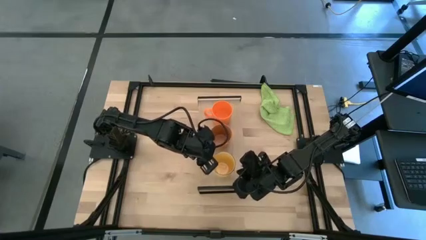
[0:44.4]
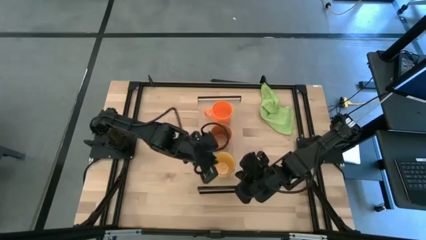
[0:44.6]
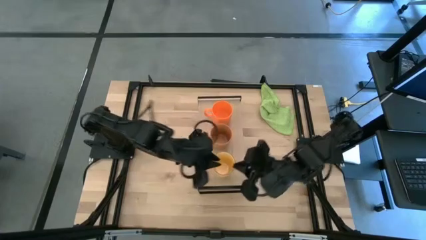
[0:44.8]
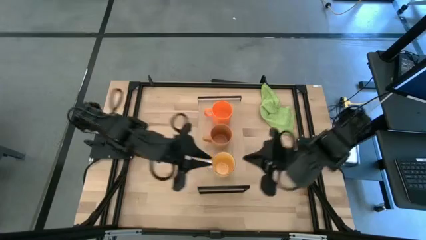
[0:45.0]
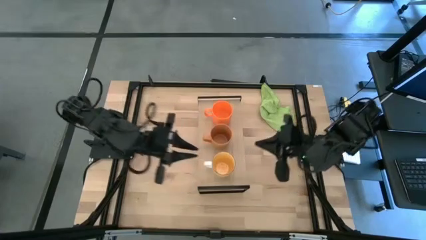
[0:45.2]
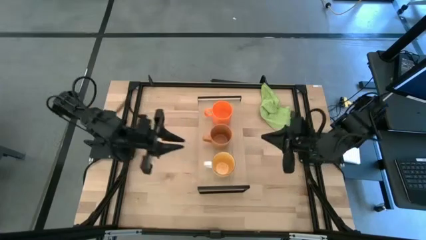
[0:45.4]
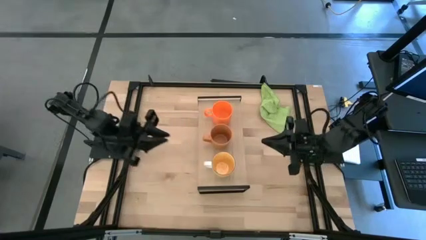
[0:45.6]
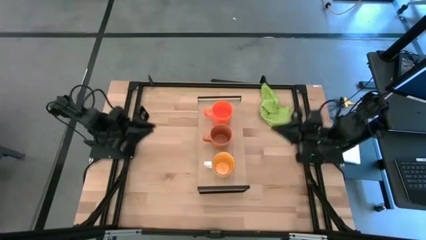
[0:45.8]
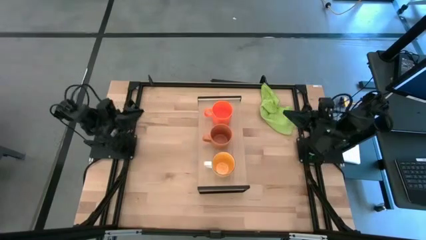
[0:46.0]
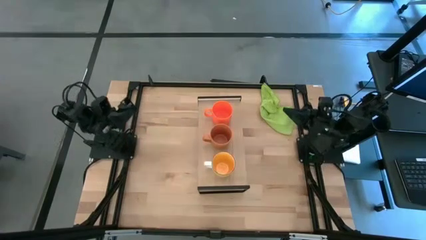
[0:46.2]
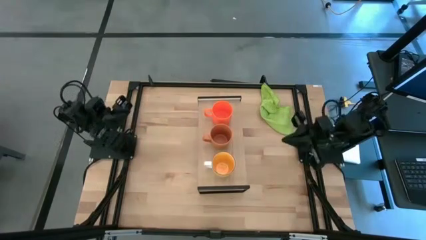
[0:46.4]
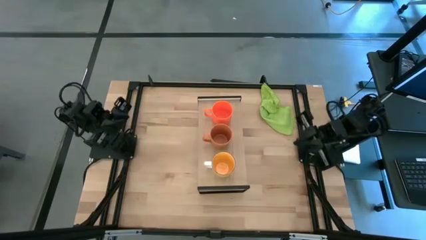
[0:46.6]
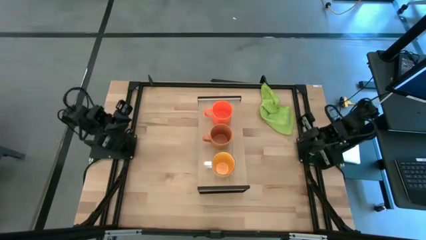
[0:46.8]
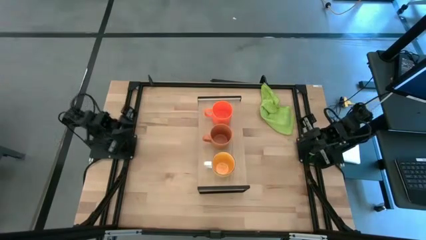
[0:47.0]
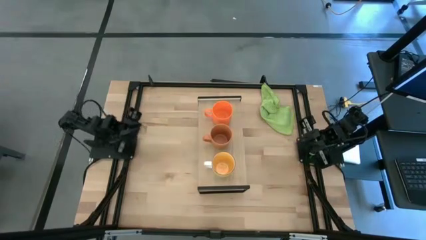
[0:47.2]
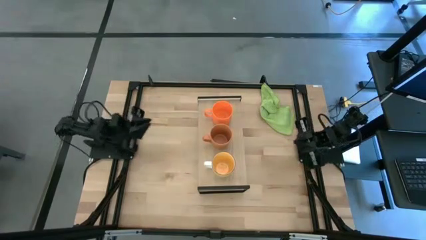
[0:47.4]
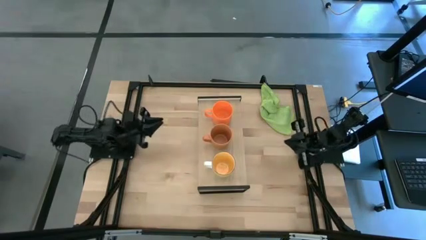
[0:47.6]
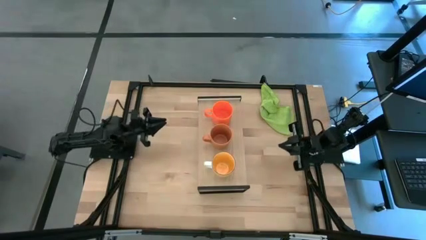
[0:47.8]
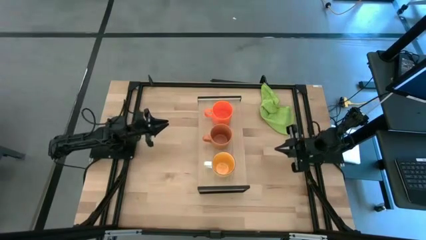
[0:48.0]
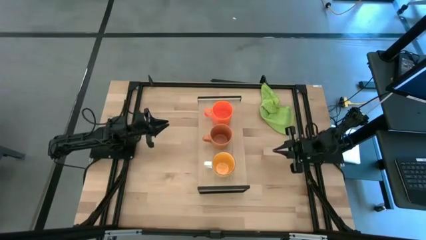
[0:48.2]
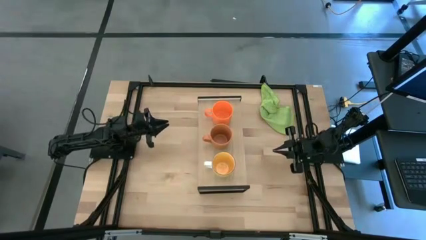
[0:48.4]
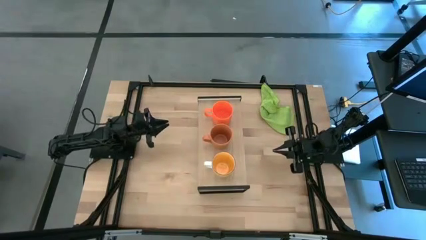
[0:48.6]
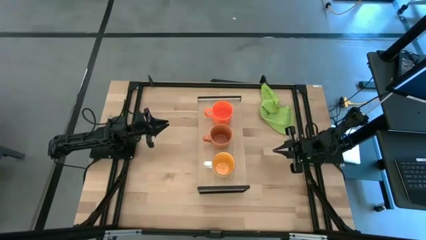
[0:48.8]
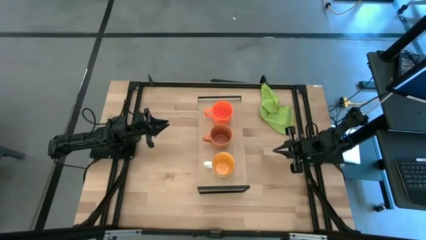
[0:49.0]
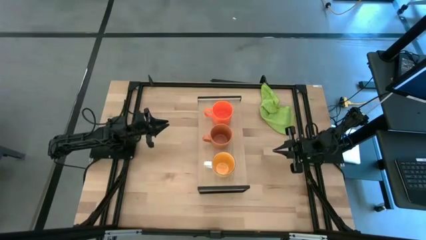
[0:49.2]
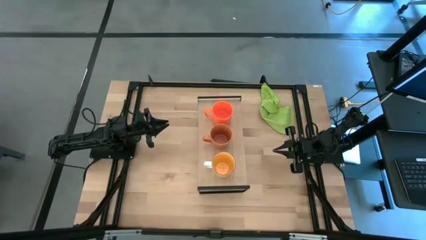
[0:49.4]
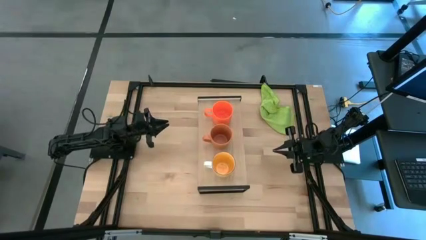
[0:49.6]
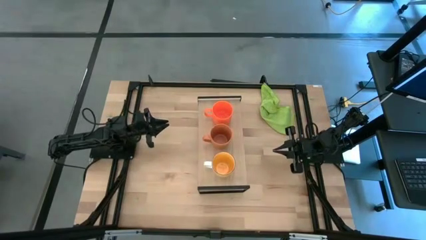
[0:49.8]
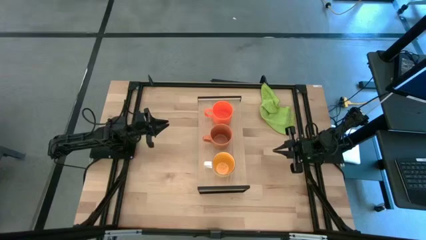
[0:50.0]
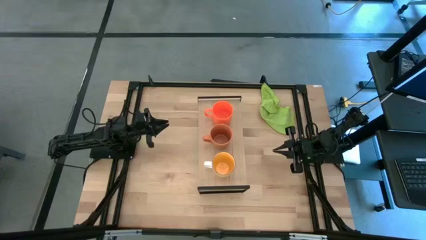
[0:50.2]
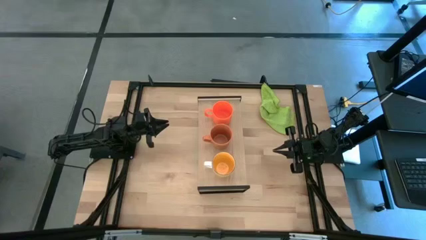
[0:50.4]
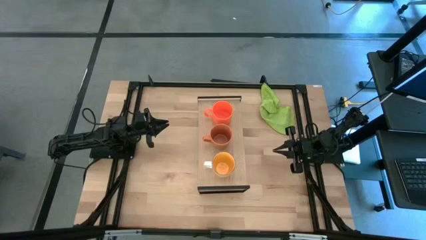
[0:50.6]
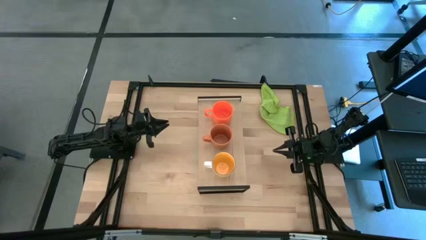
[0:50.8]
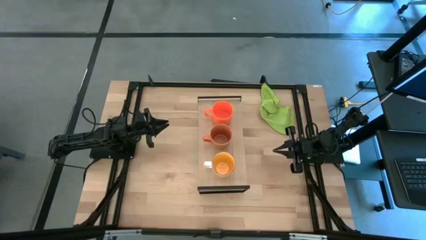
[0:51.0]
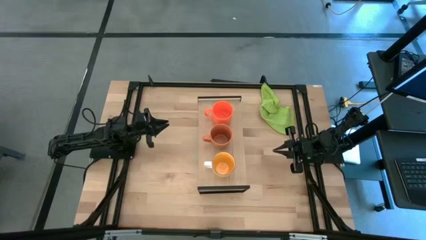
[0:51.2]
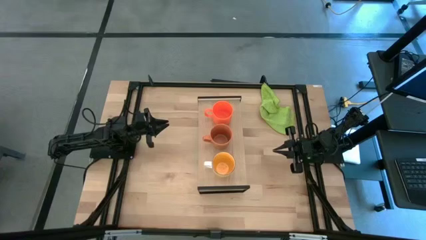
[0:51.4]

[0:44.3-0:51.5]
Task: Stack small to large cups/mugs on shelf
Return to Home Position

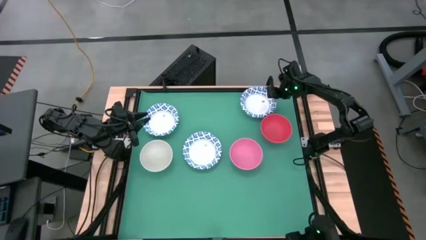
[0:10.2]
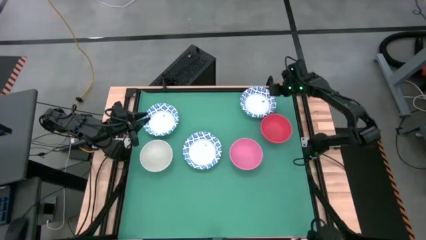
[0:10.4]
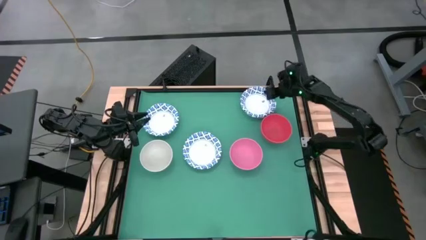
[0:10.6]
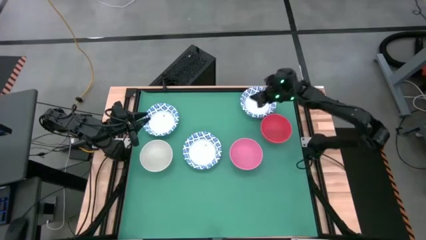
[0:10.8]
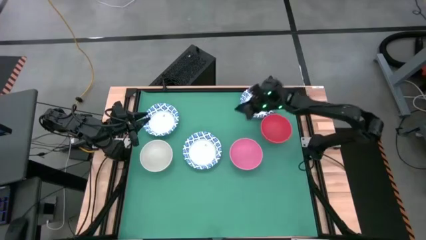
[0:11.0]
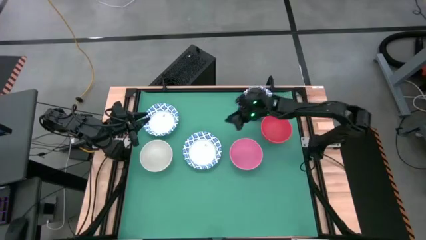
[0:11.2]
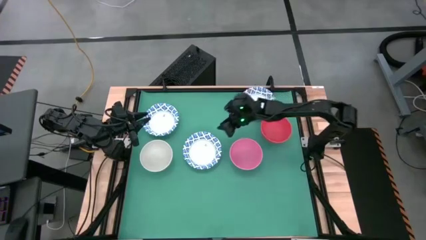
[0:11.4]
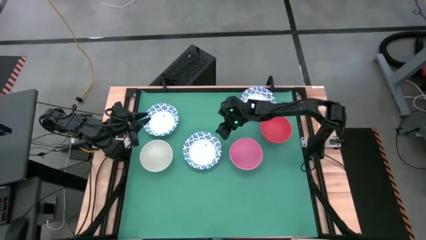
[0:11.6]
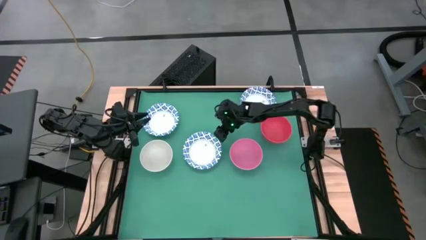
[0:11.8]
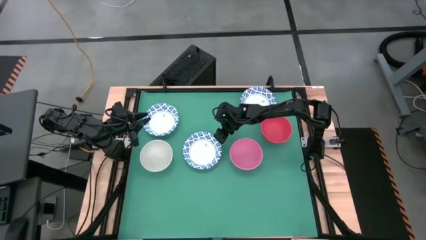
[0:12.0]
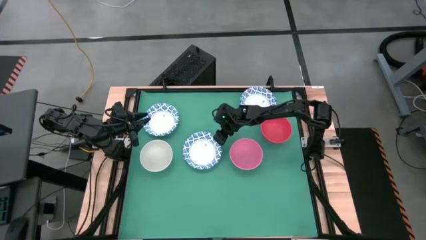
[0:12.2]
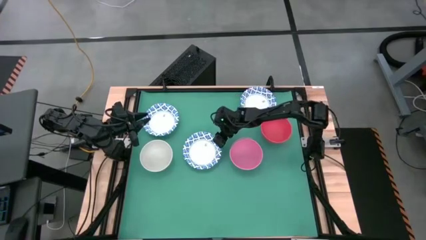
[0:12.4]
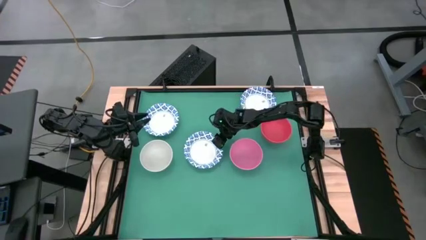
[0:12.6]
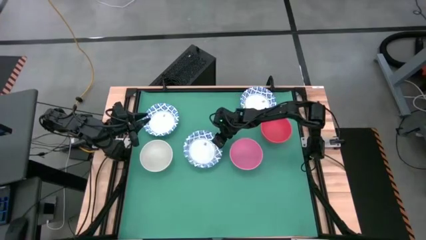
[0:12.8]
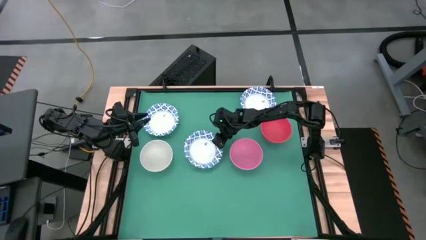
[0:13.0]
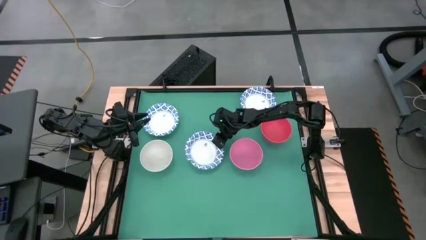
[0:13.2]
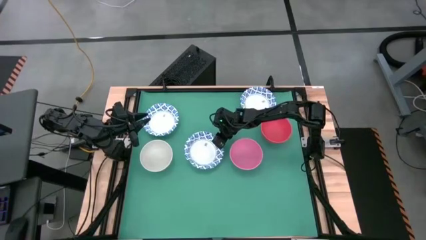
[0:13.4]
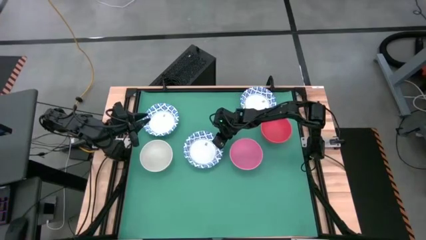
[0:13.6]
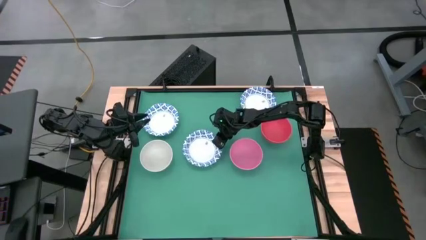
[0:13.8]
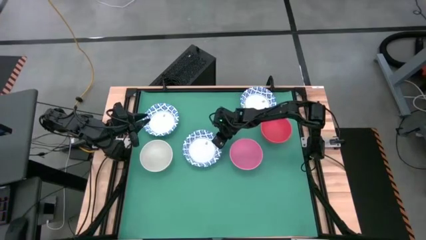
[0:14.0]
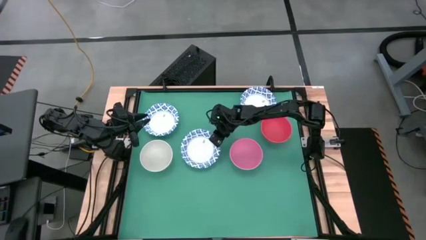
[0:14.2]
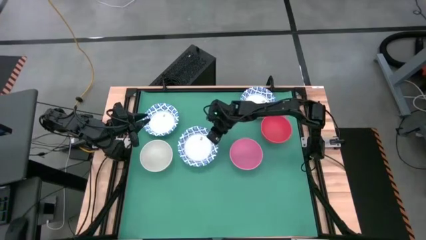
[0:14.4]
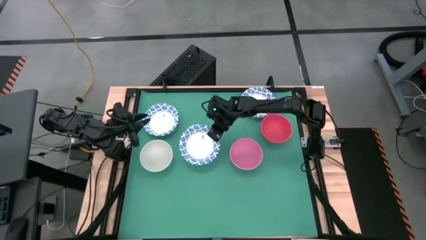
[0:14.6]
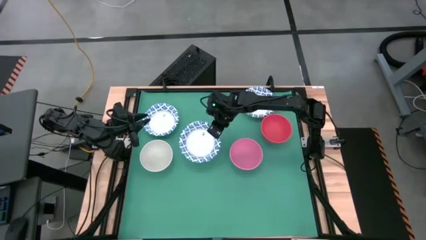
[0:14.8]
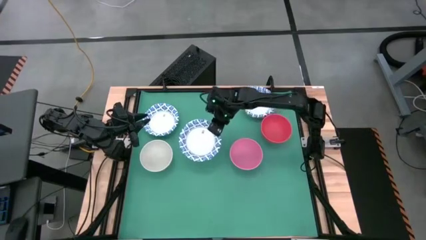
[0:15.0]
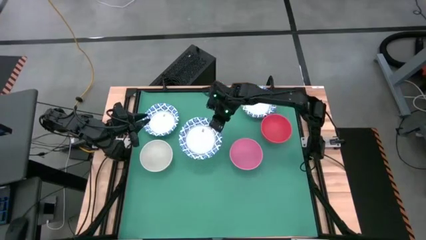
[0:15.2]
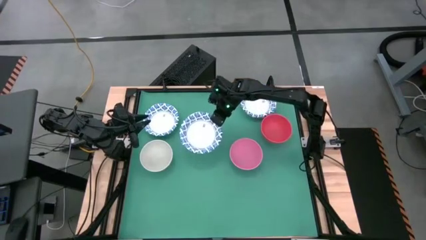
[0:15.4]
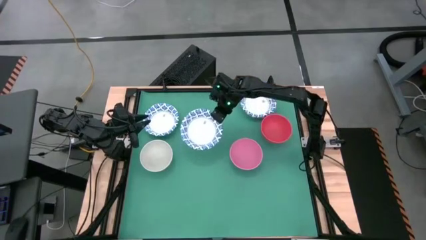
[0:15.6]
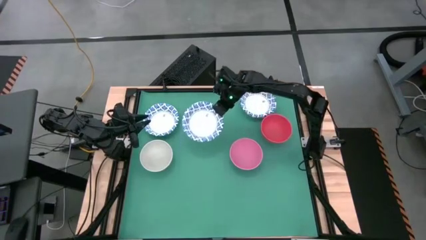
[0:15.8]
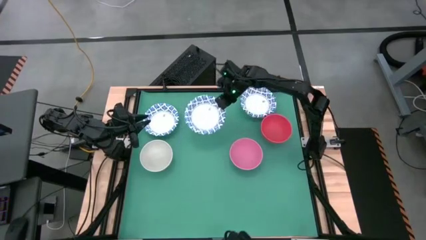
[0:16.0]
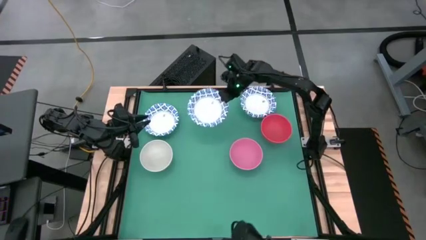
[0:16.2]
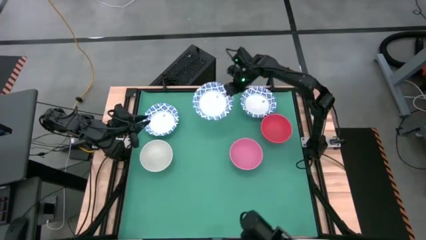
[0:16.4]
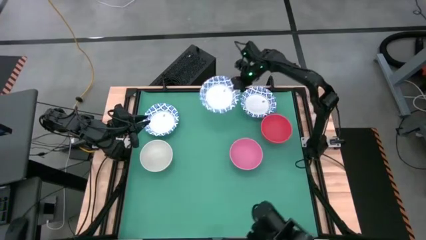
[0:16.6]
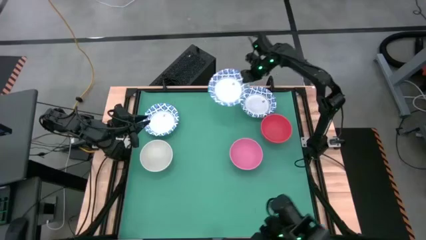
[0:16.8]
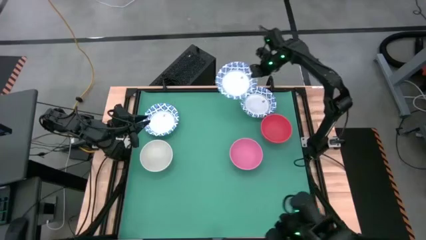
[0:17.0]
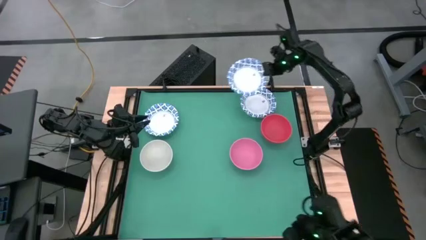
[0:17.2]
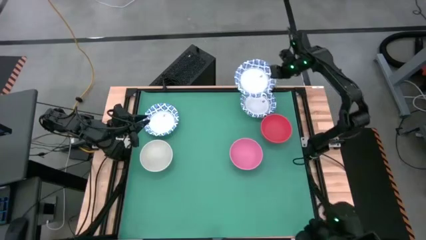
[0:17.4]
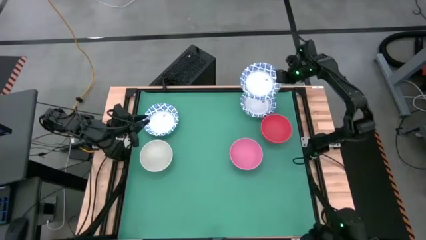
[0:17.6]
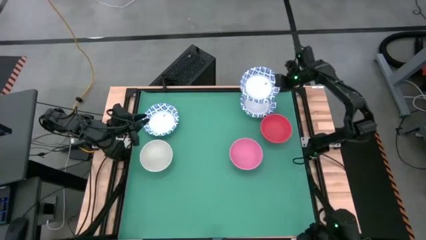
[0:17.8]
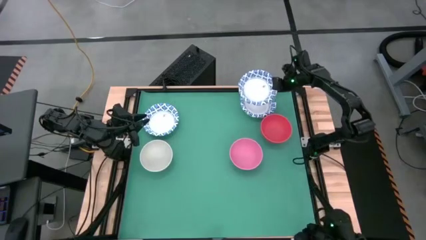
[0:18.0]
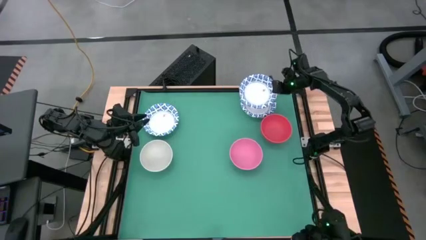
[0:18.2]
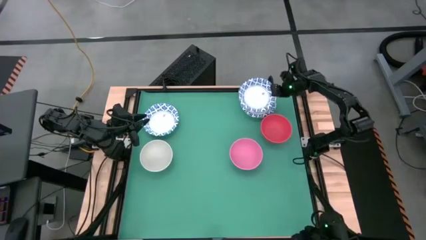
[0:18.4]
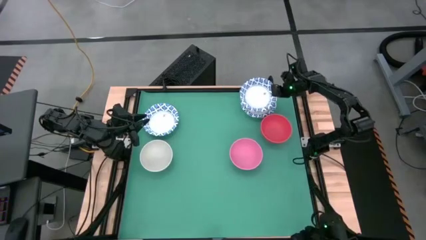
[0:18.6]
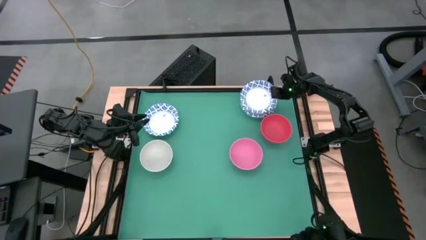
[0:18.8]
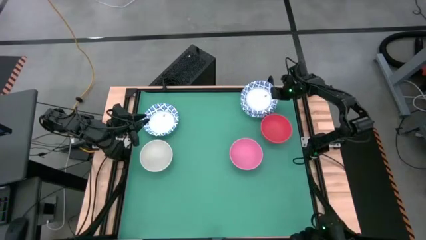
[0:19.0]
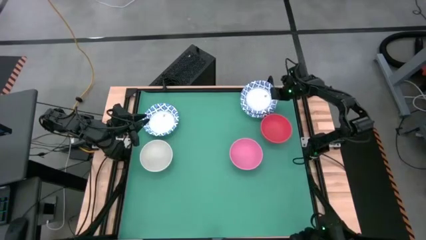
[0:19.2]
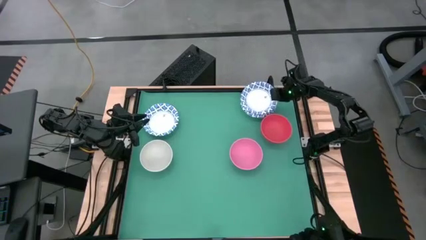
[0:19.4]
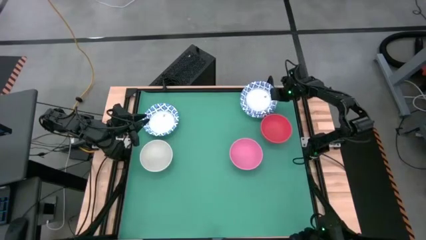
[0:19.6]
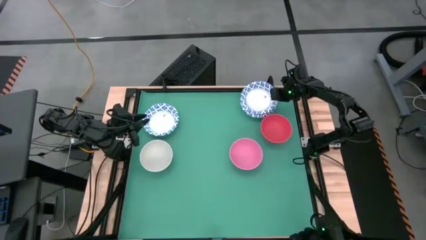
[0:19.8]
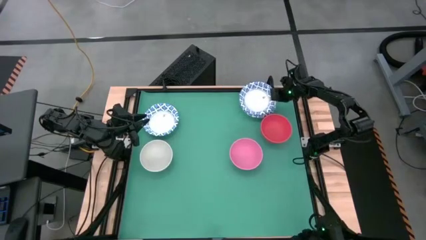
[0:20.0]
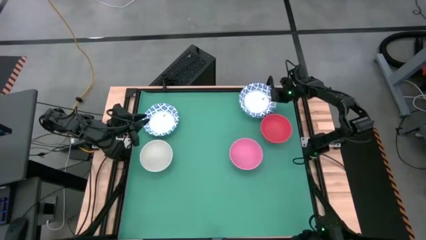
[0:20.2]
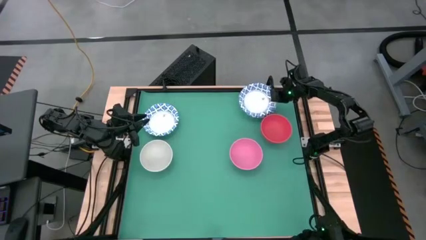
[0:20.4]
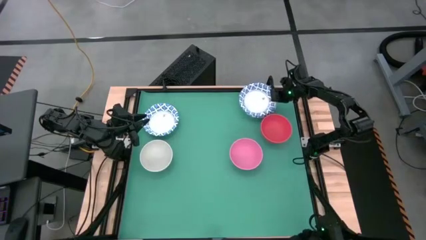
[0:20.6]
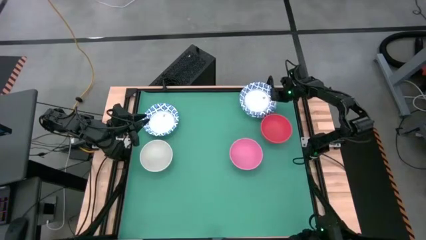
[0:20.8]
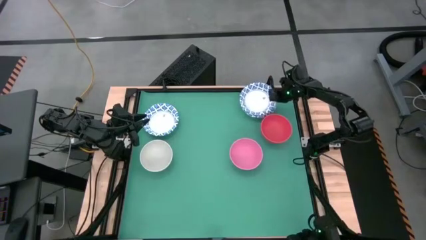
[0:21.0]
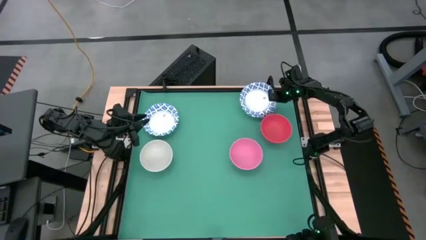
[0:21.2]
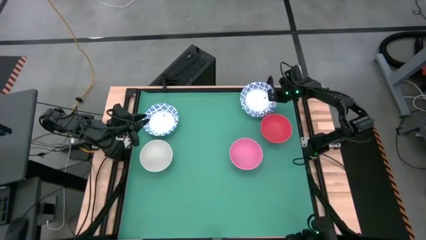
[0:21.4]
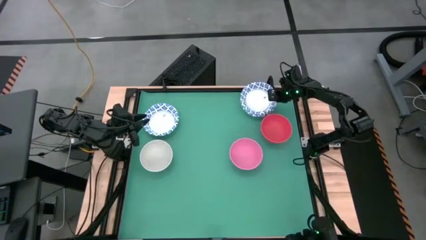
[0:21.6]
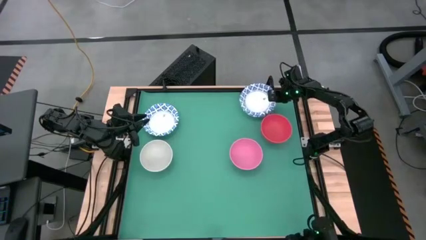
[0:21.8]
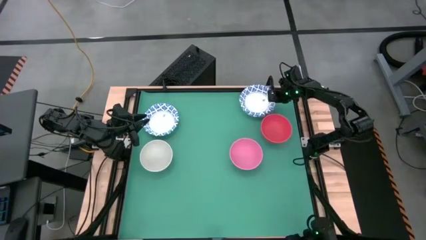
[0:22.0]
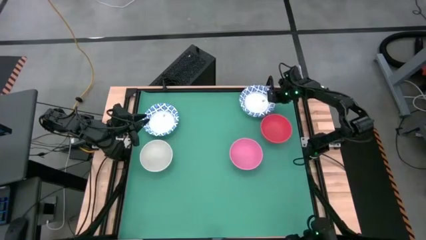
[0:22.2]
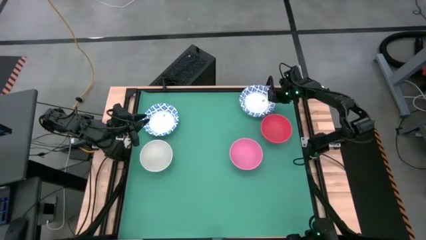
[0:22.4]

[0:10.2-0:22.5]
Task: Nest bowls inside each other by size order
Stack the white patterned bowl on top of the white patterned bowl
